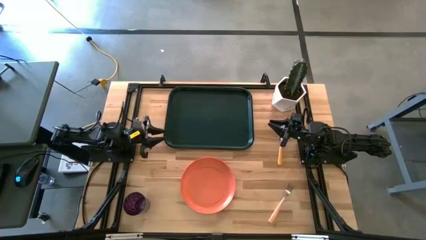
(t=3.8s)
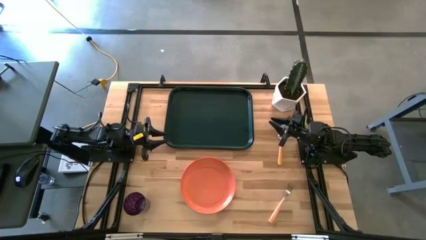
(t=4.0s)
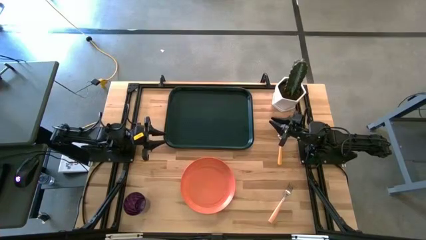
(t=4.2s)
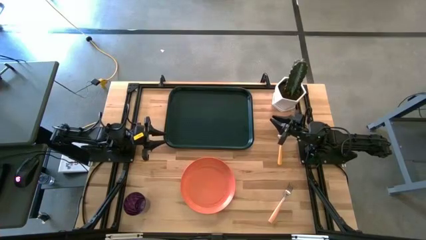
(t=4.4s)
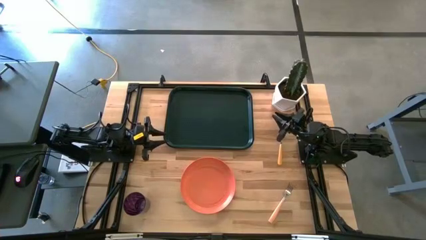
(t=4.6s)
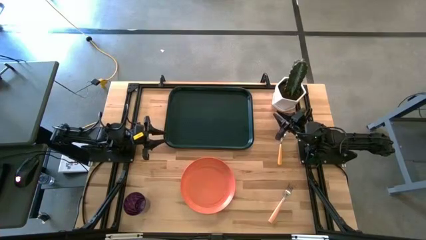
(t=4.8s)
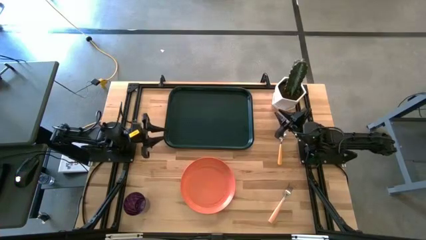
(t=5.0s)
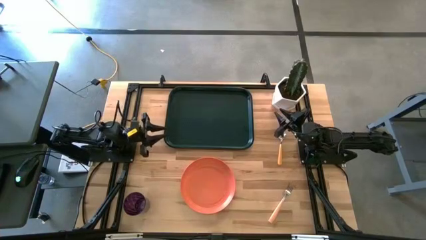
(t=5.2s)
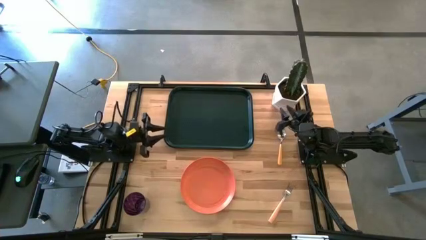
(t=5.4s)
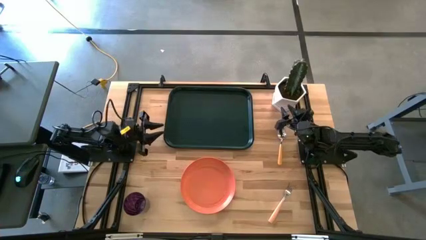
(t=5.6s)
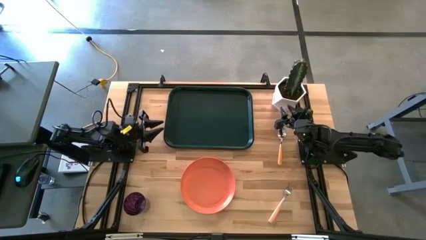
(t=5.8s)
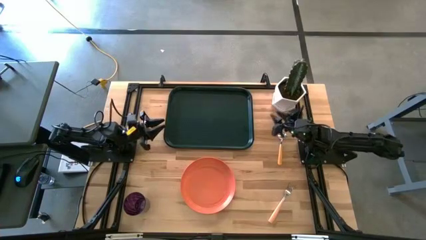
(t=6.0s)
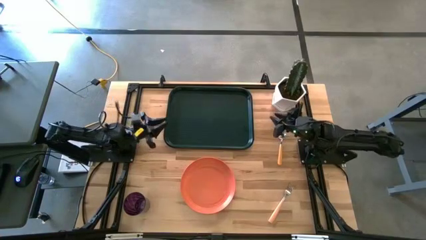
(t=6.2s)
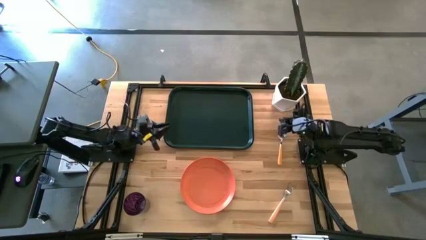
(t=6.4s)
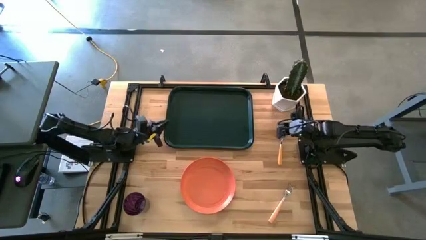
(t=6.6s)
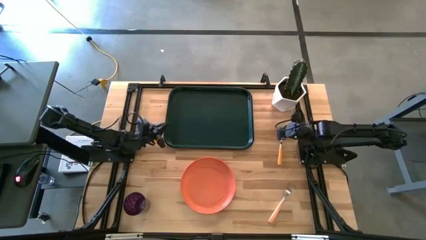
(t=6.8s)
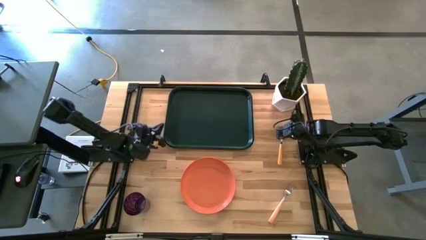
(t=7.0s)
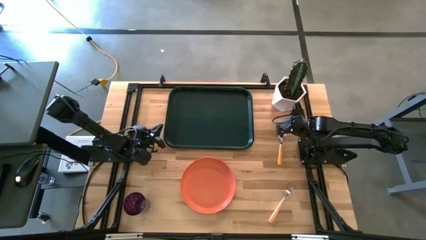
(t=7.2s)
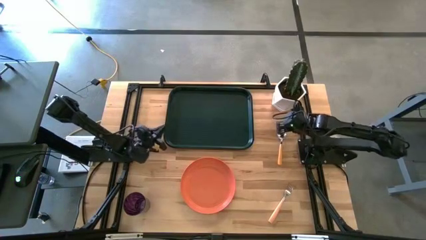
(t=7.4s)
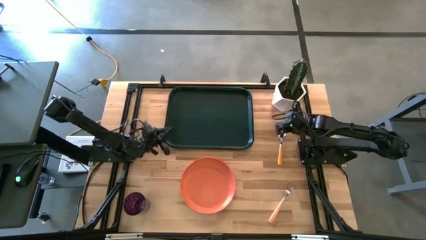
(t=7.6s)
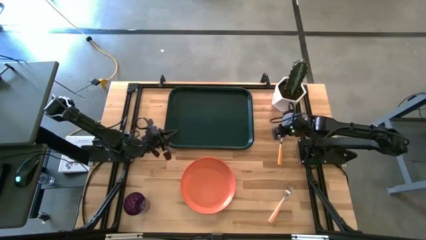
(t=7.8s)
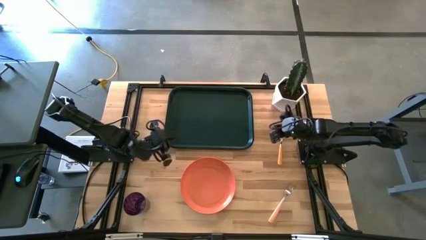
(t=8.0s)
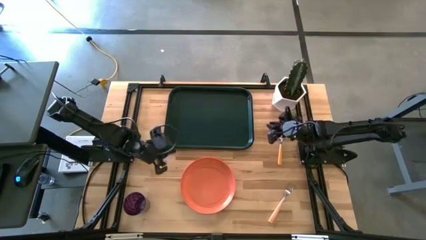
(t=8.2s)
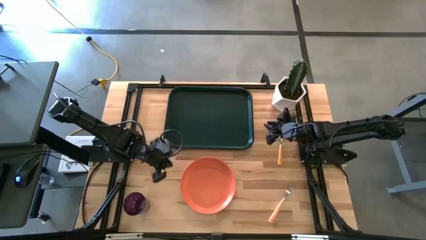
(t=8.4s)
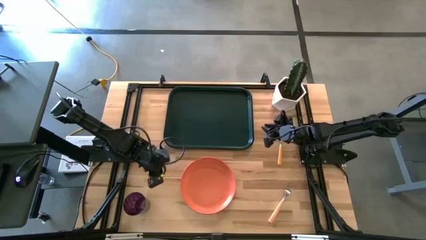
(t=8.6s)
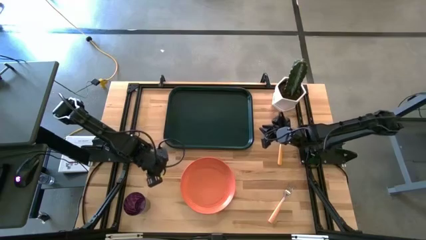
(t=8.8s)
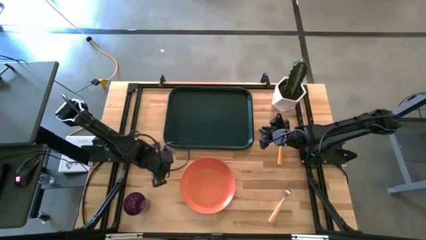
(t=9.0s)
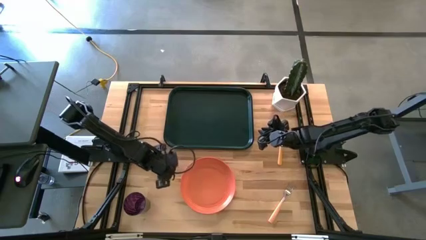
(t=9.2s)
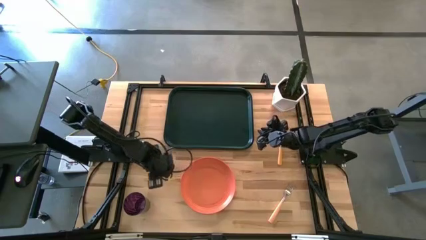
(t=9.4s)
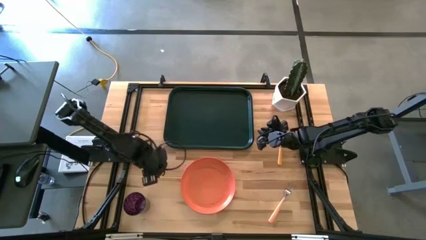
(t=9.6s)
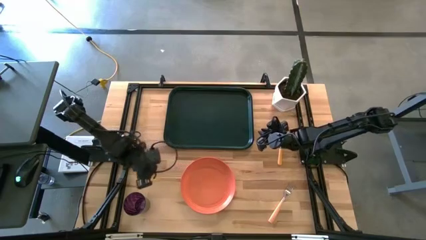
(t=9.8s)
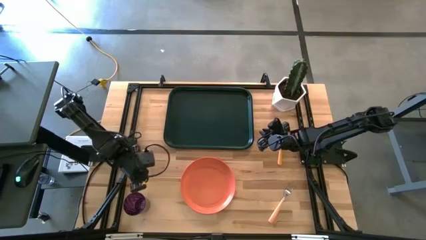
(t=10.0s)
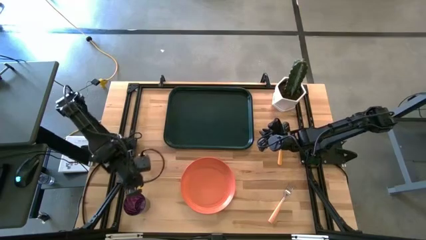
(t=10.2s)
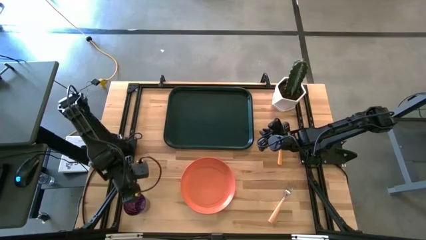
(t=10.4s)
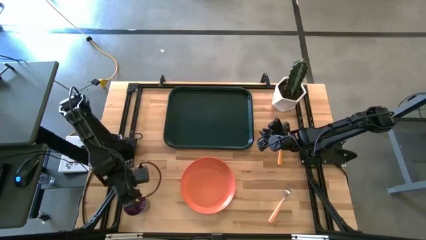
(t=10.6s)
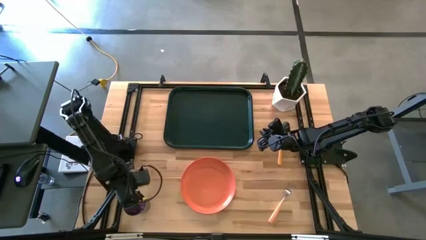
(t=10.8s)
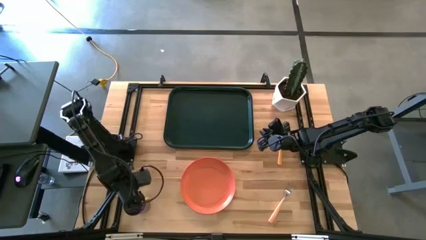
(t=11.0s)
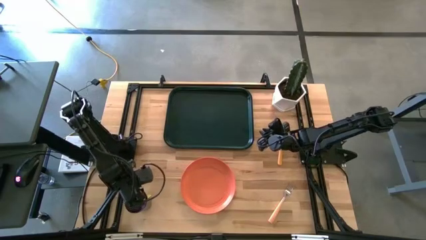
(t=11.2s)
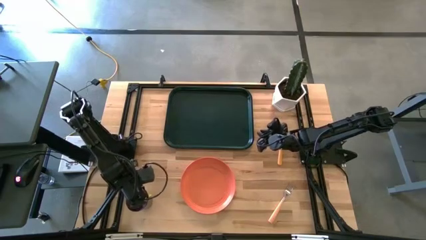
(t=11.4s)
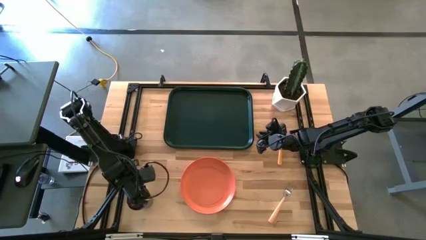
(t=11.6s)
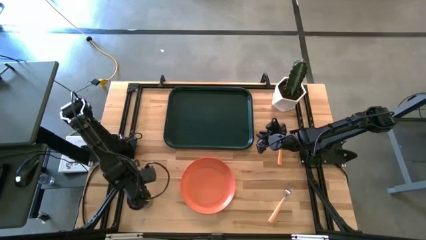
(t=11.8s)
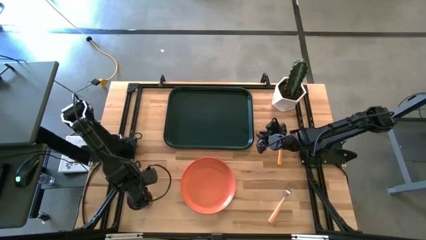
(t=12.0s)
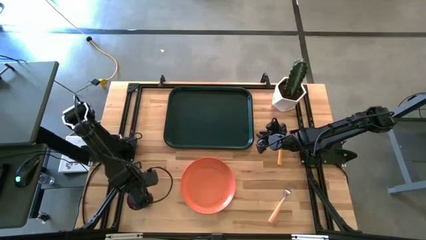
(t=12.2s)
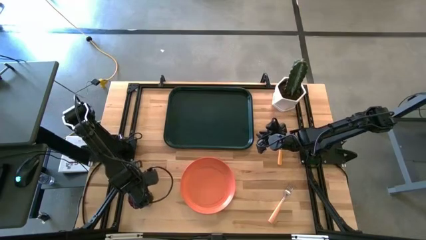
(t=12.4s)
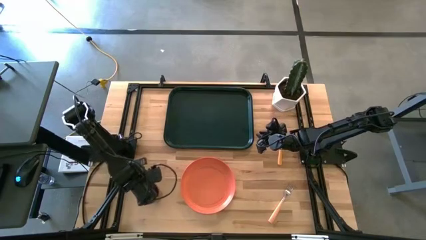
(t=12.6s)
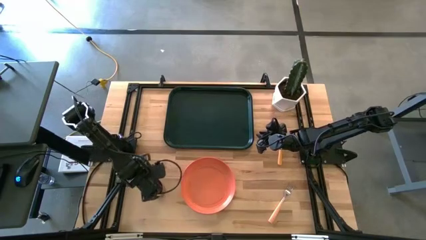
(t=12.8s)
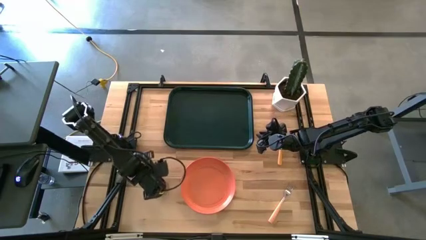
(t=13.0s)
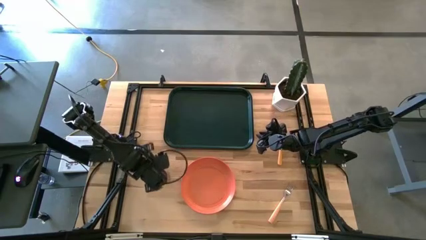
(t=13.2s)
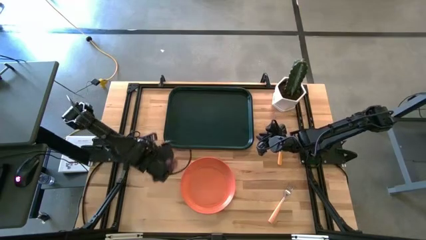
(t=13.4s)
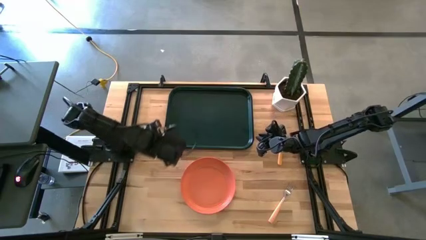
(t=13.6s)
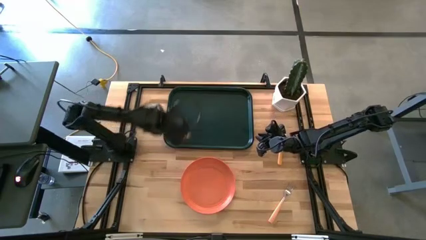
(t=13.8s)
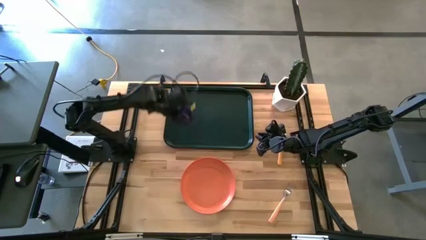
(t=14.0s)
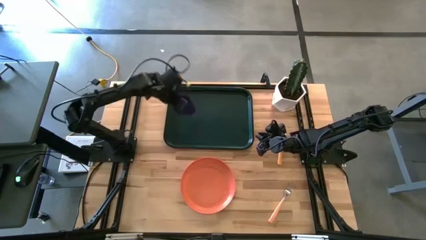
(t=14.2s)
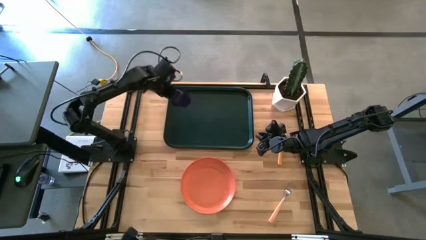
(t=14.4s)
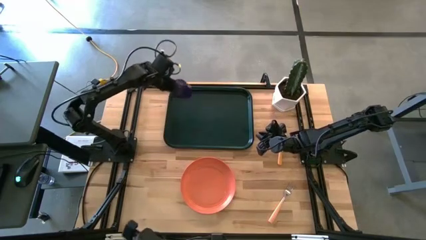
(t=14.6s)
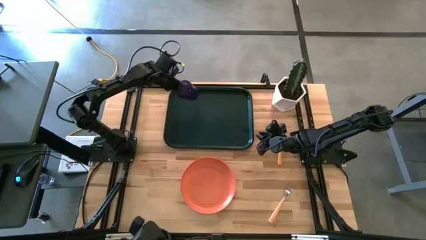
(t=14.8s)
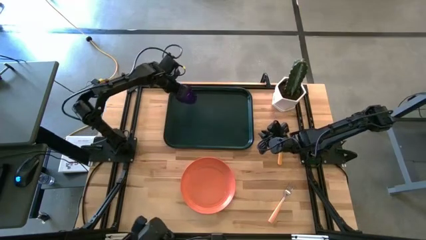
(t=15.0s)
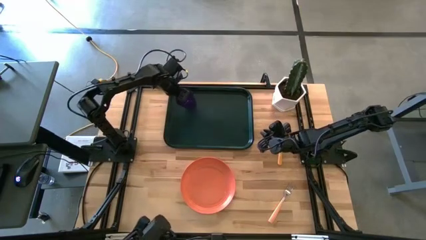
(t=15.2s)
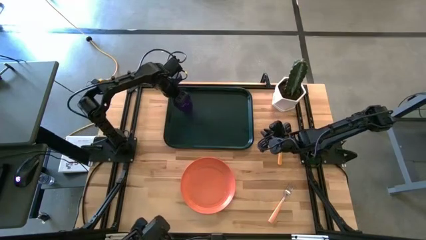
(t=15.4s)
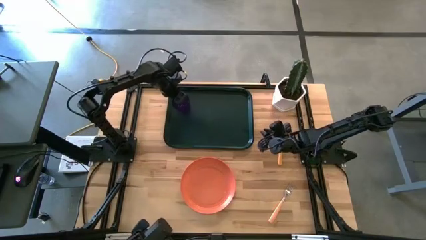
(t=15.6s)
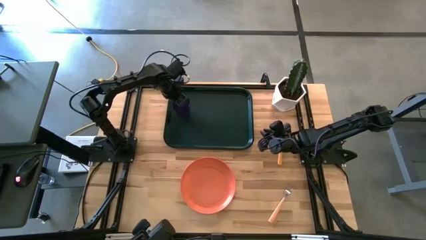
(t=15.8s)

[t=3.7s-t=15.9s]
Task: Pick and place plate/cup/fork/spoon on tray
Put the glass cup on the top left of the serving tray

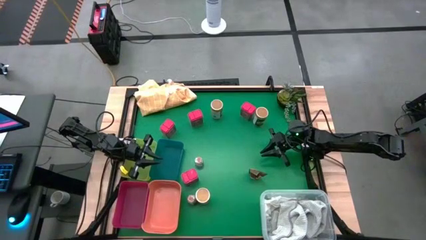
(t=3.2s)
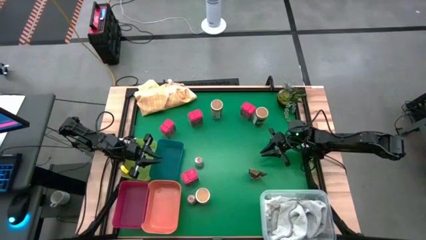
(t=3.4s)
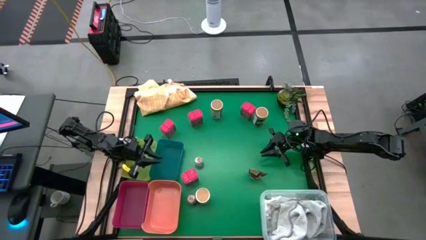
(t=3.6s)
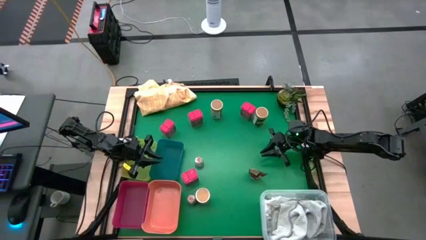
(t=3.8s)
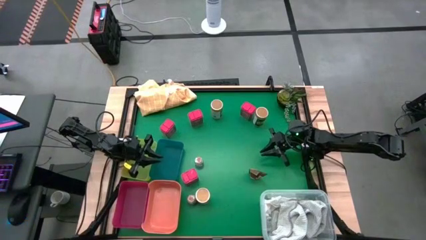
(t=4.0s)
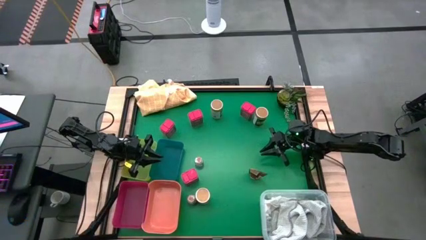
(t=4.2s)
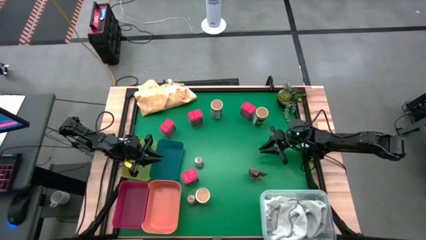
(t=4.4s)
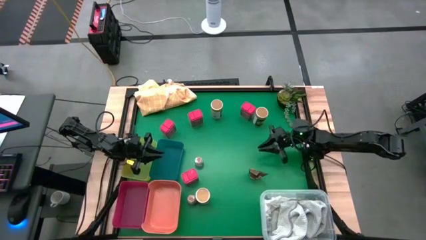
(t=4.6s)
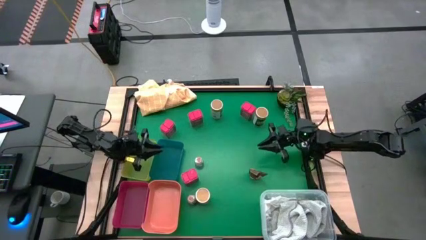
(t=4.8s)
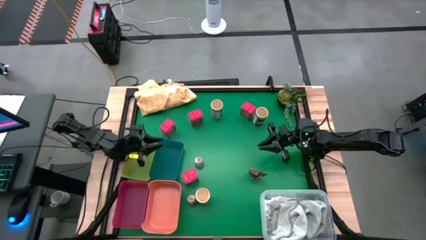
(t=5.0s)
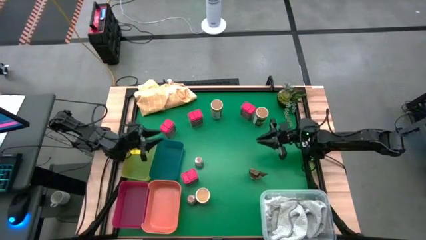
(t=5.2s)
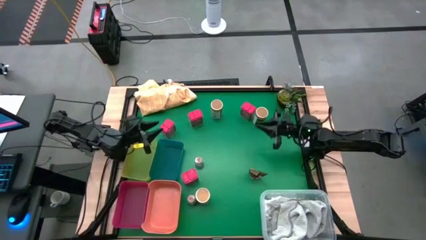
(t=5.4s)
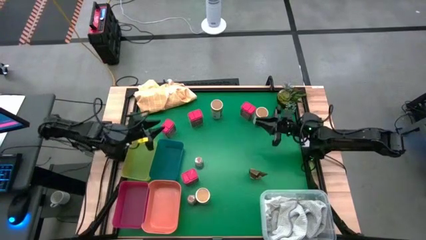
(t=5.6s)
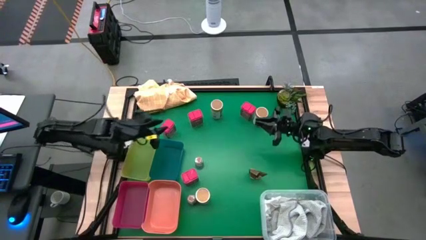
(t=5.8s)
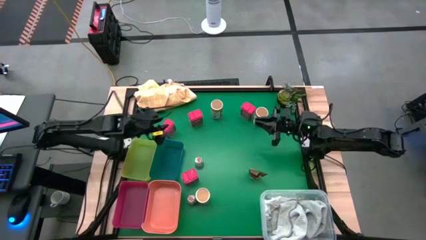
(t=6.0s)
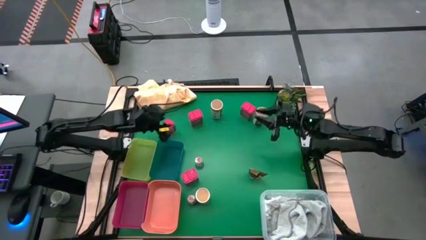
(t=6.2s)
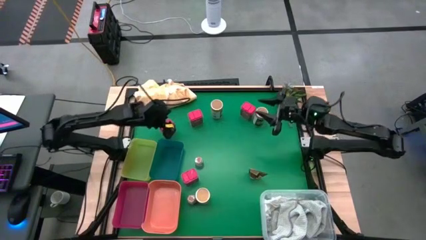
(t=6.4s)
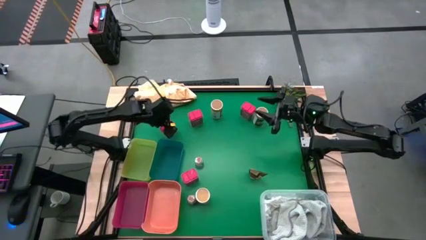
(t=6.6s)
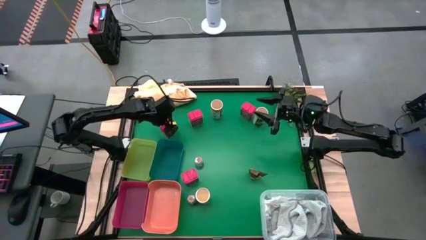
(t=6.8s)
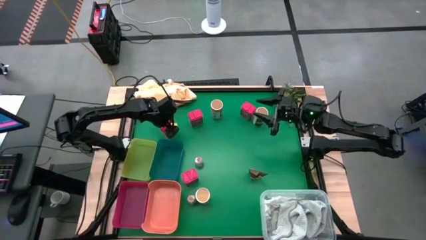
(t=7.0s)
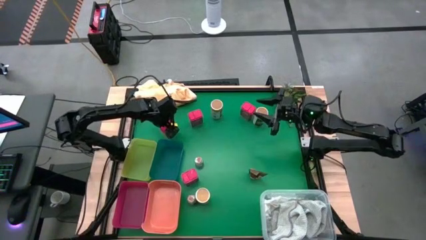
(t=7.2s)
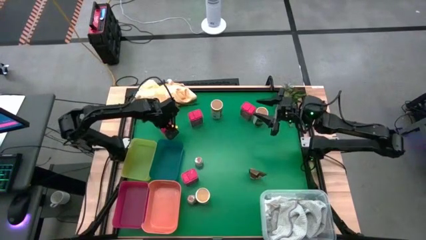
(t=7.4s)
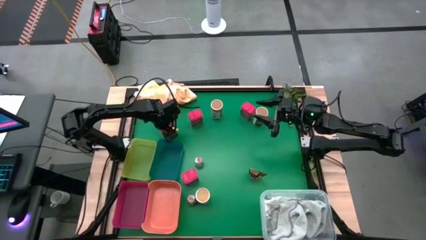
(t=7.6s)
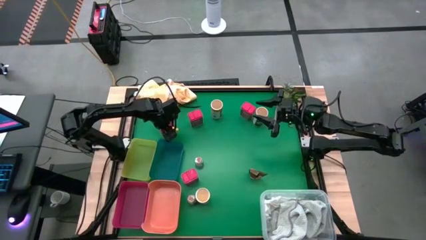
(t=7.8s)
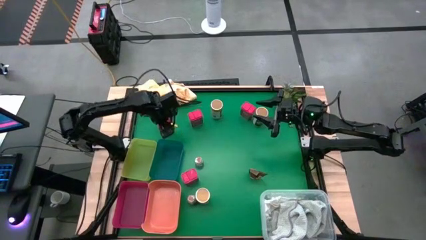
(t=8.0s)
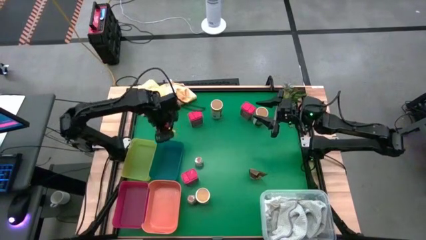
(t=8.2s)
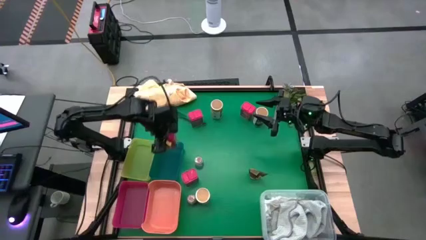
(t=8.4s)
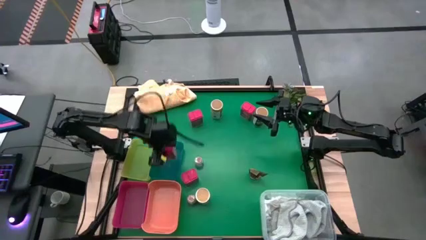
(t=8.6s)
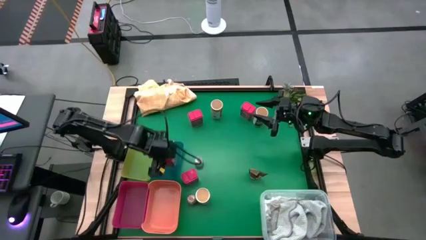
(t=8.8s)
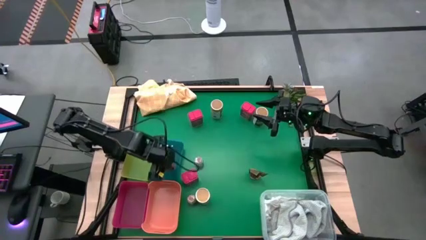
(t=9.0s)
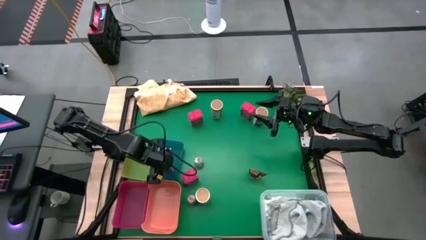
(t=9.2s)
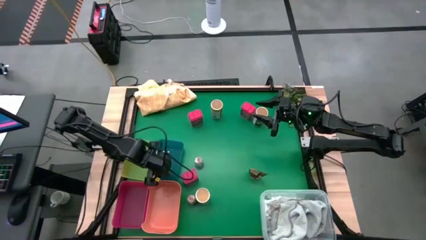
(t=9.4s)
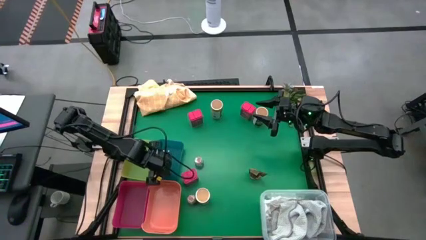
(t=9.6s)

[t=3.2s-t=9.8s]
Task: Sort spices by type
Put the red seasoning can into the blue bin
